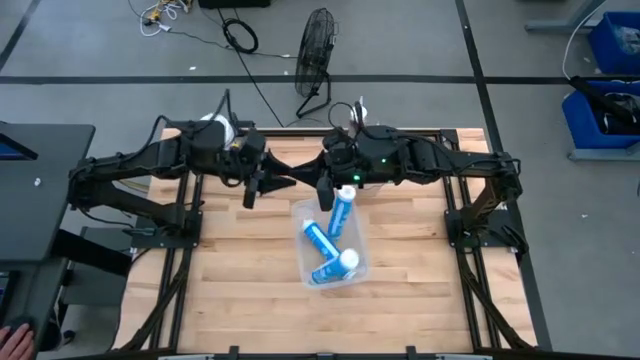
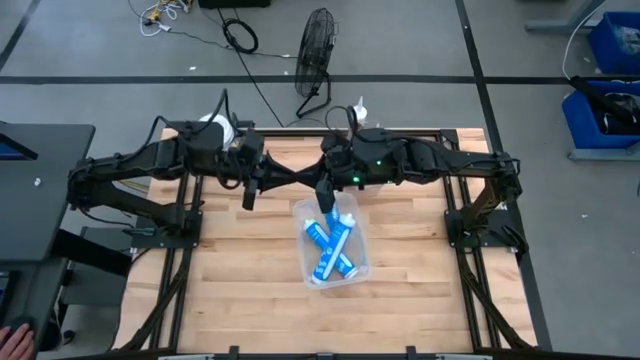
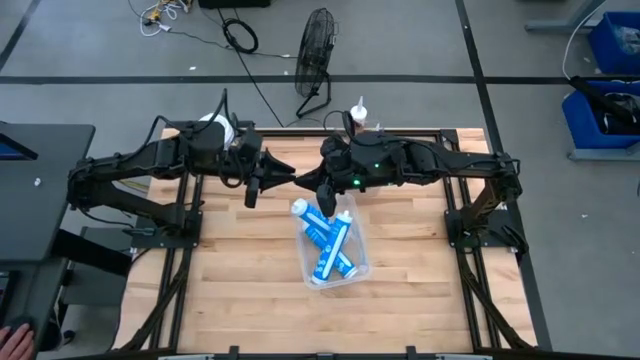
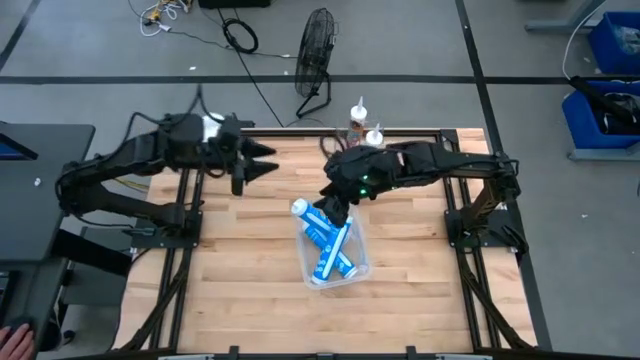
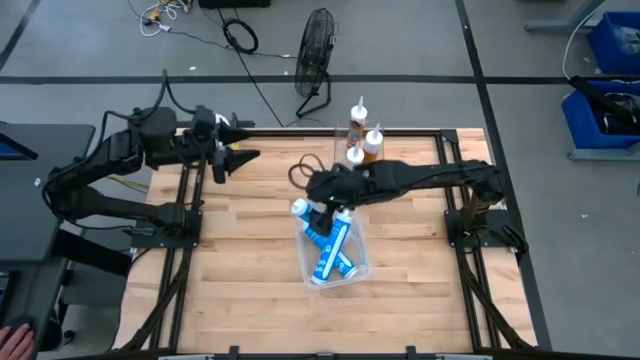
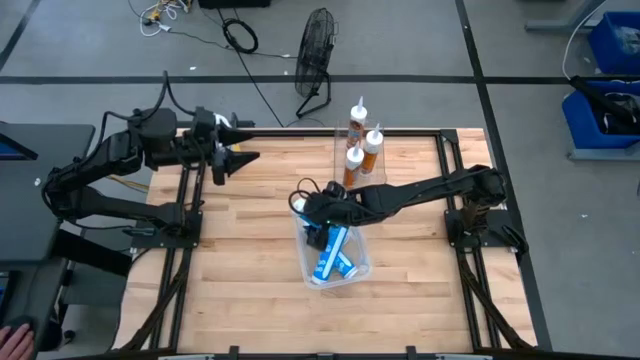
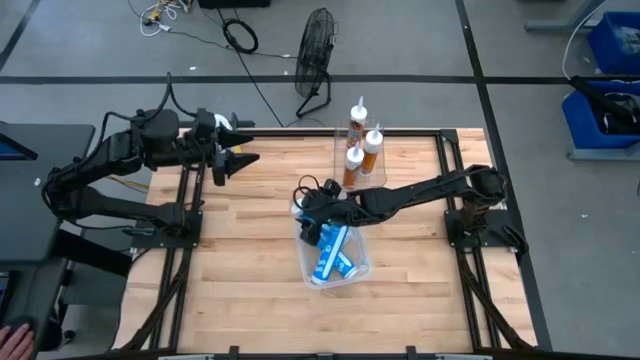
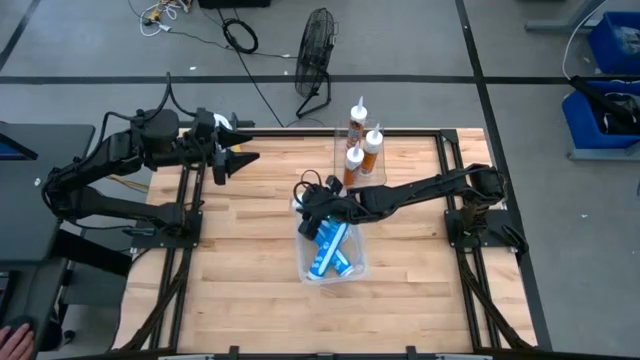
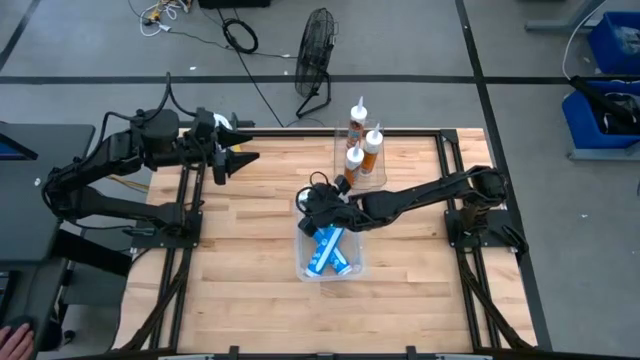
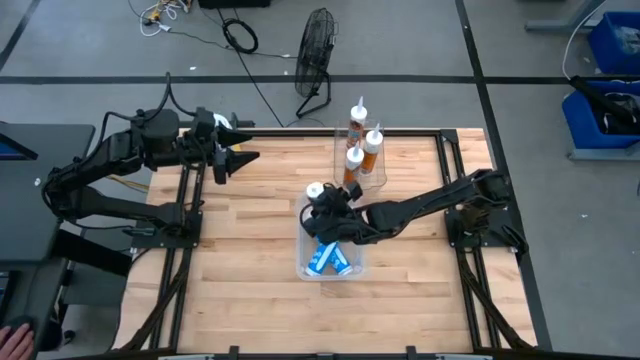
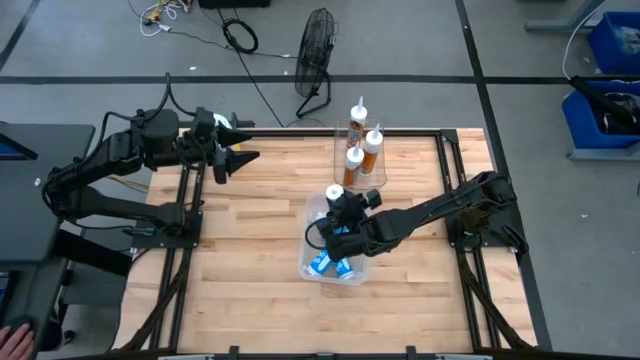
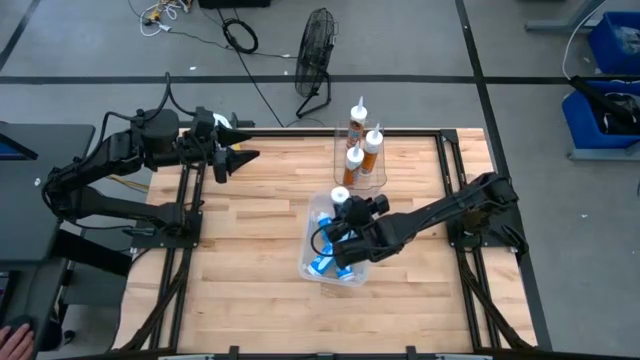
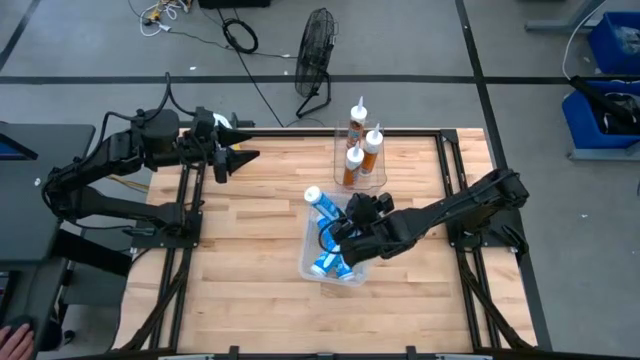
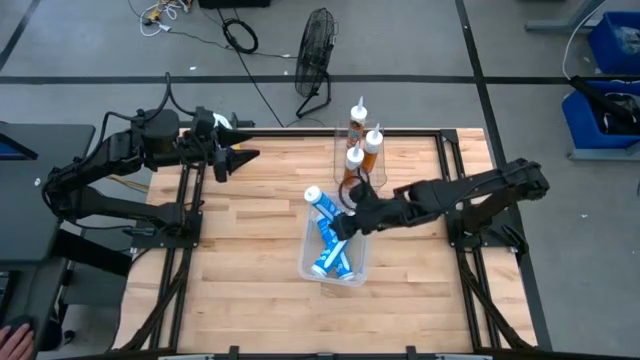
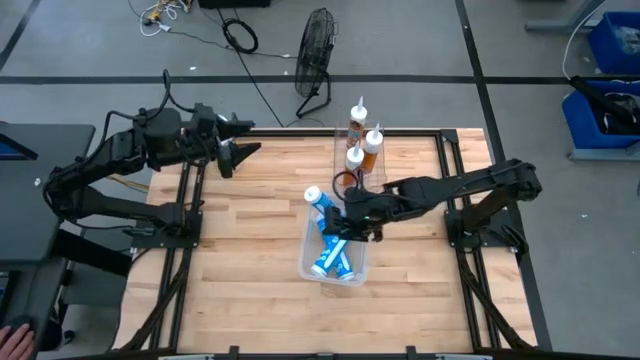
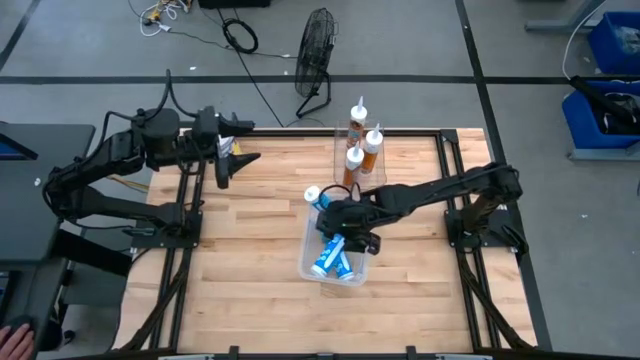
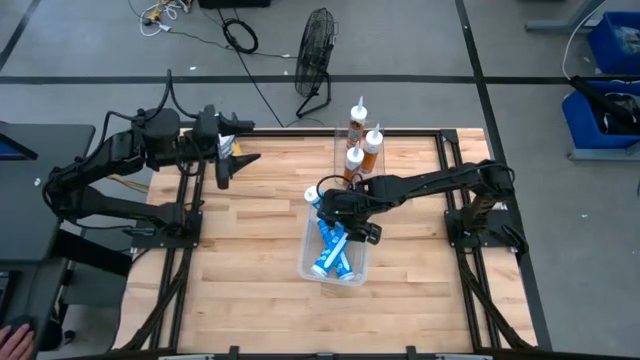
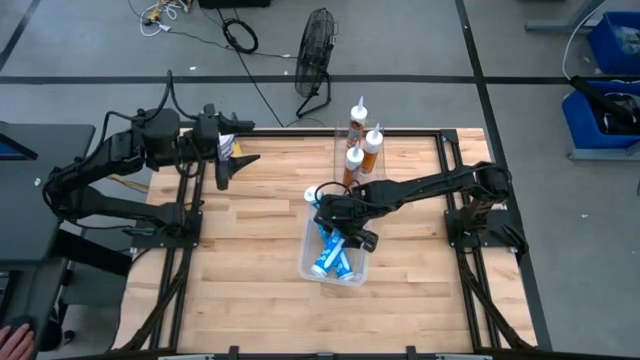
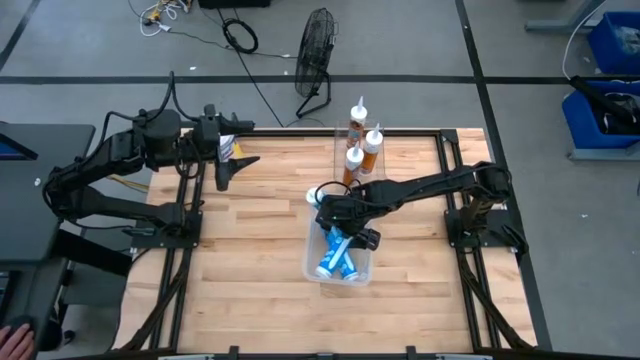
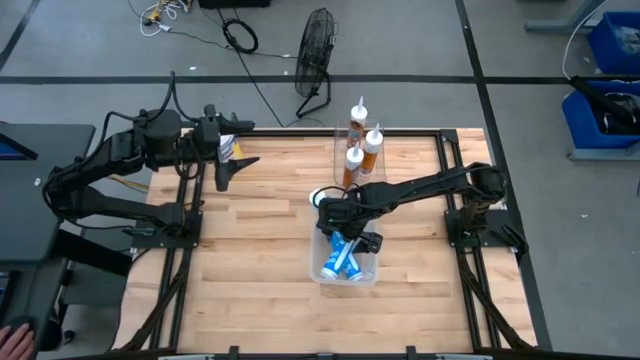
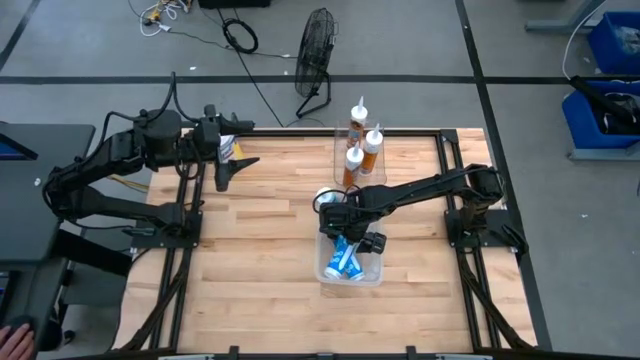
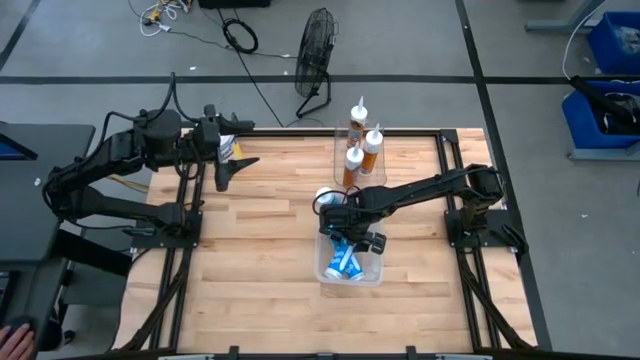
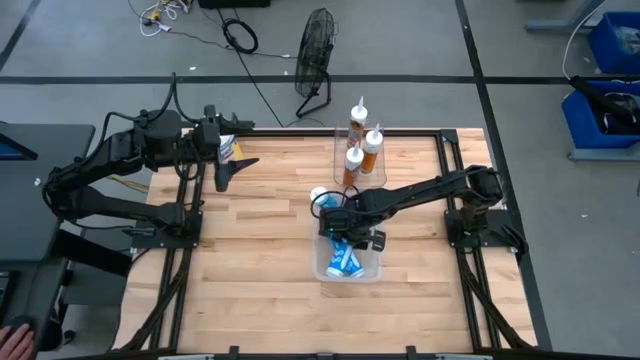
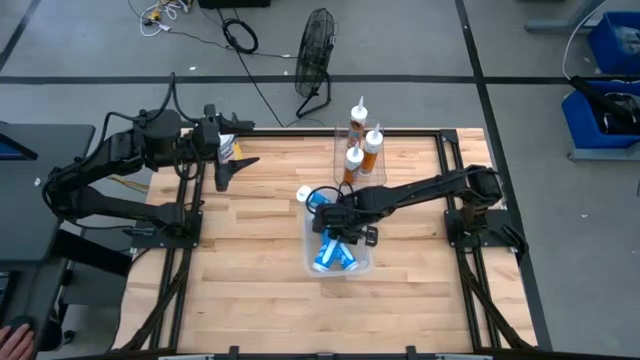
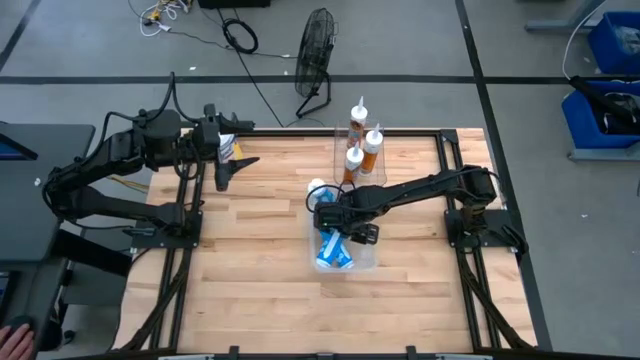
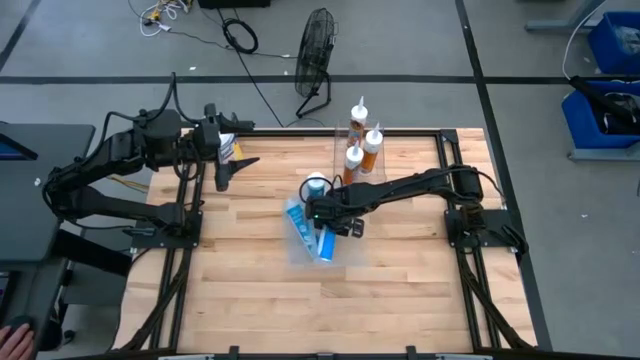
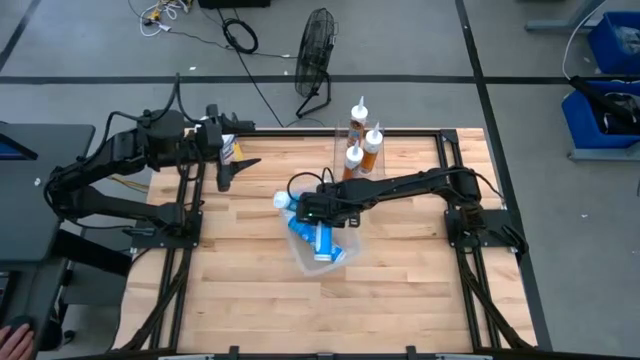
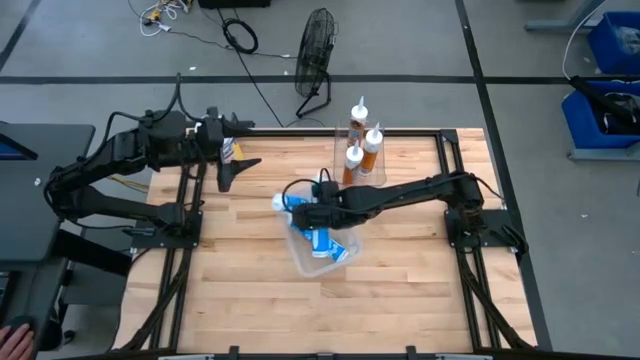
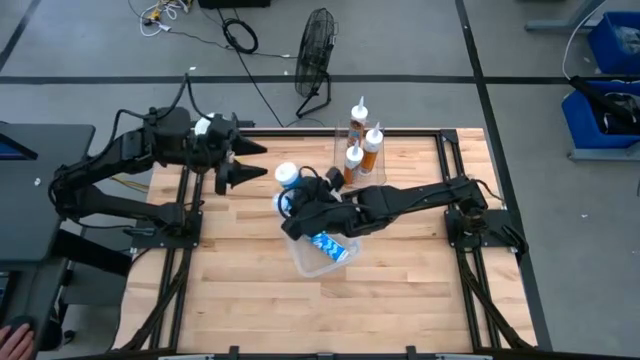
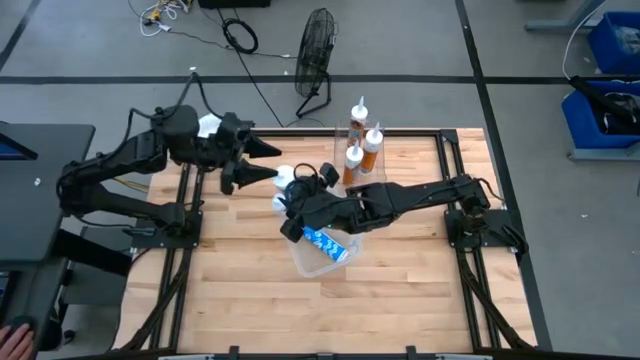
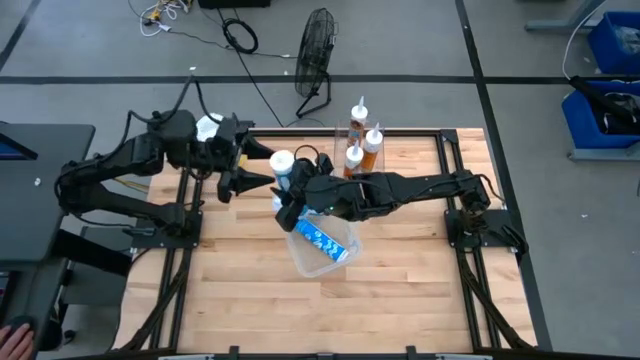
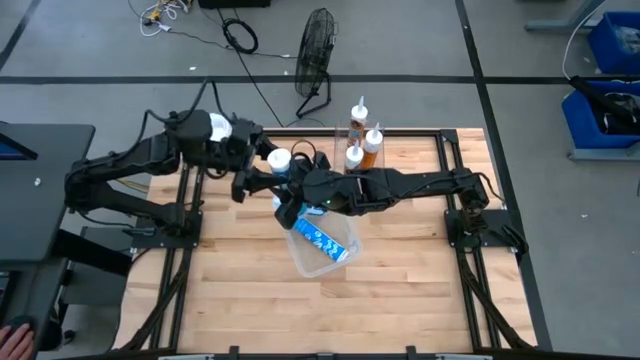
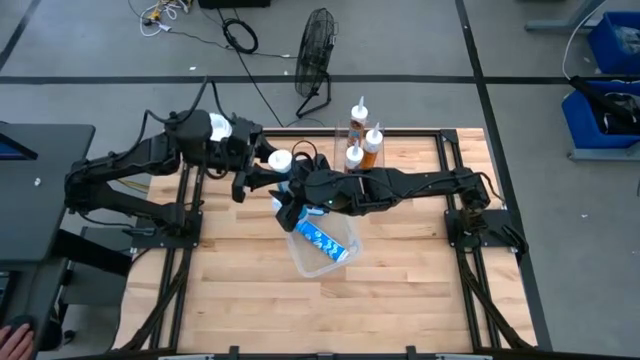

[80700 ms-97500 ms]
Task: Sort silicone sealant tubes
Adjust the blue sealants in the bottom transparent bin
